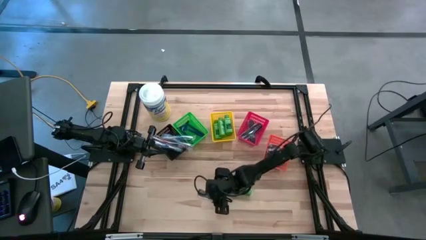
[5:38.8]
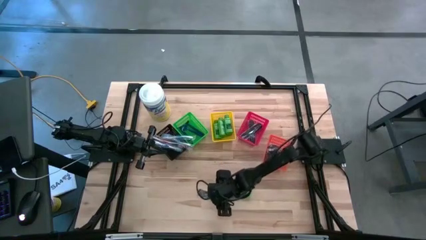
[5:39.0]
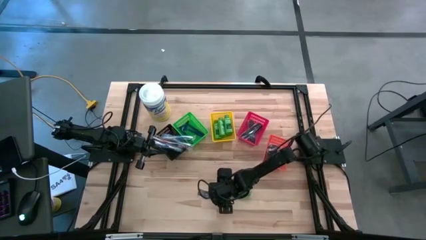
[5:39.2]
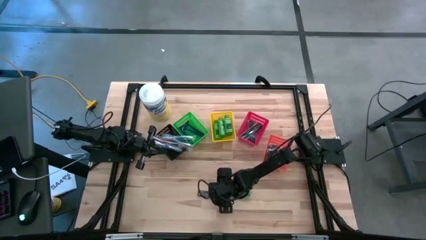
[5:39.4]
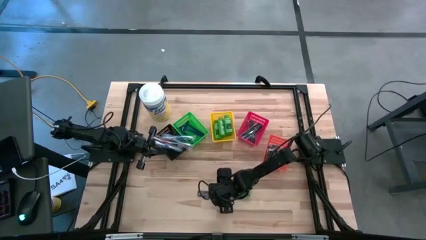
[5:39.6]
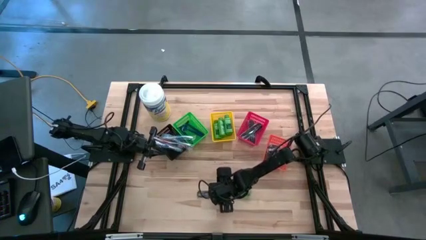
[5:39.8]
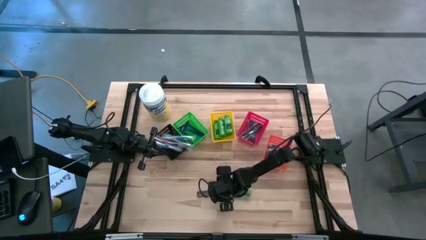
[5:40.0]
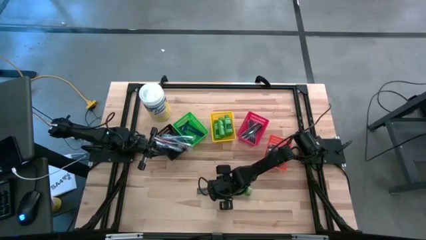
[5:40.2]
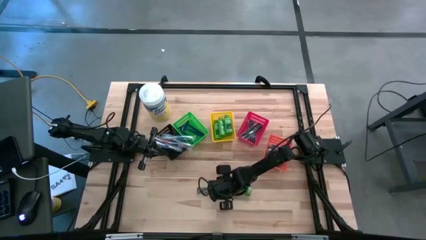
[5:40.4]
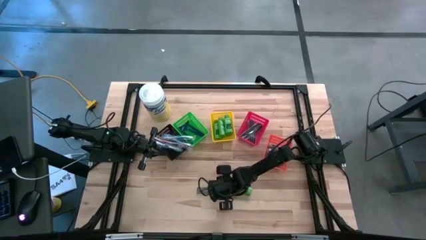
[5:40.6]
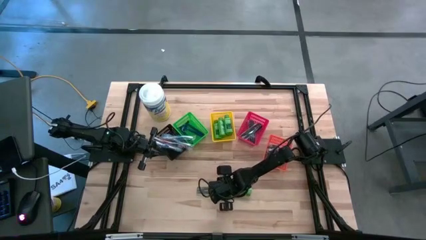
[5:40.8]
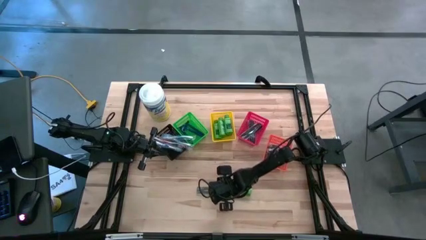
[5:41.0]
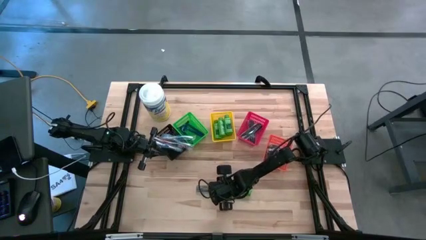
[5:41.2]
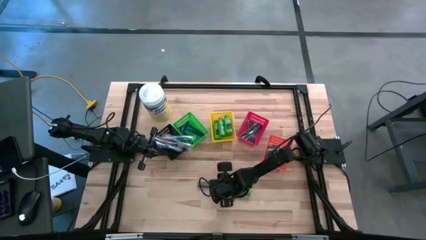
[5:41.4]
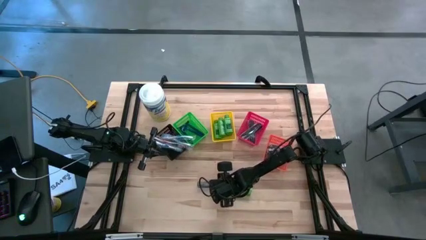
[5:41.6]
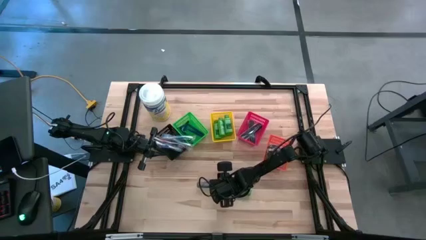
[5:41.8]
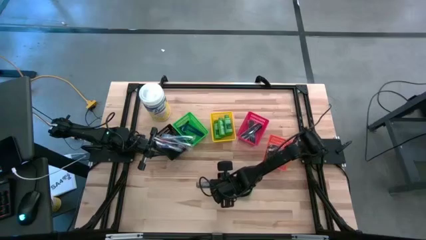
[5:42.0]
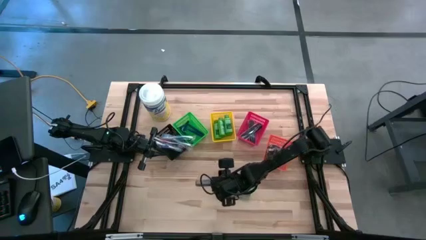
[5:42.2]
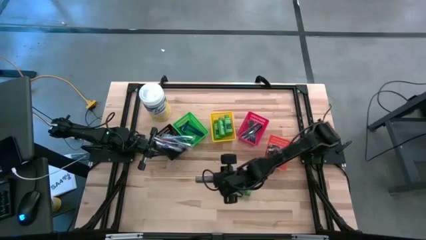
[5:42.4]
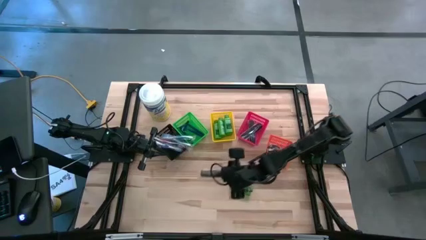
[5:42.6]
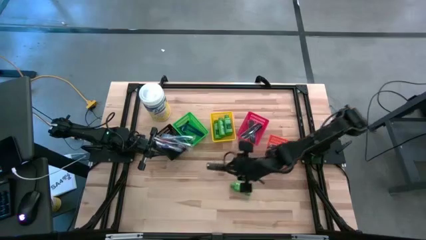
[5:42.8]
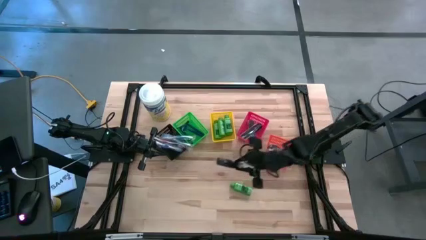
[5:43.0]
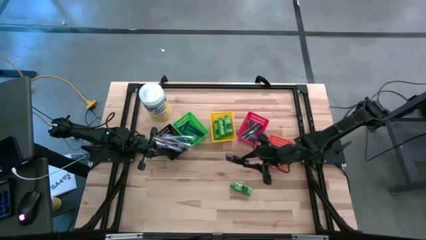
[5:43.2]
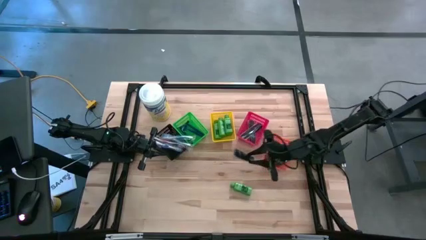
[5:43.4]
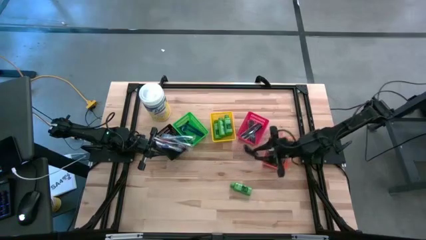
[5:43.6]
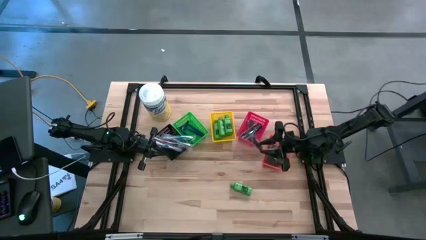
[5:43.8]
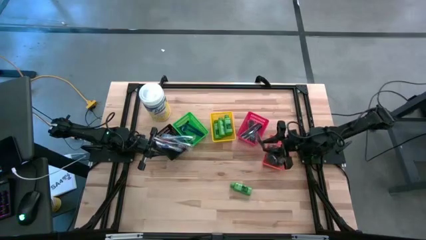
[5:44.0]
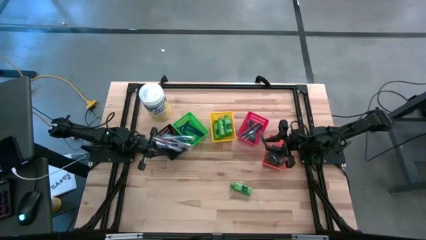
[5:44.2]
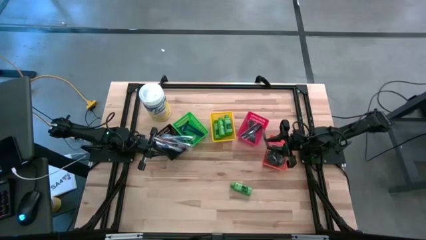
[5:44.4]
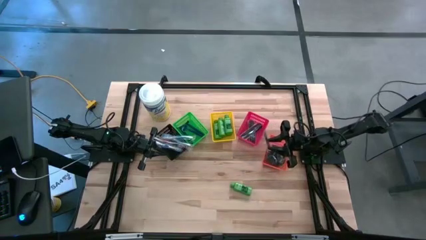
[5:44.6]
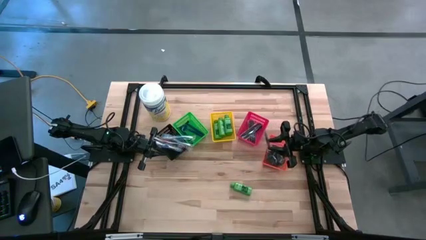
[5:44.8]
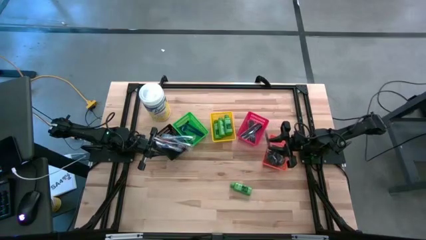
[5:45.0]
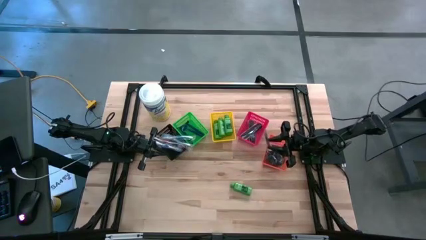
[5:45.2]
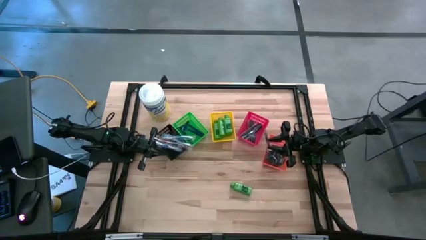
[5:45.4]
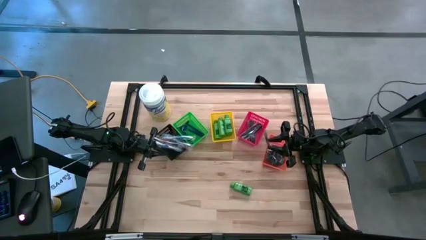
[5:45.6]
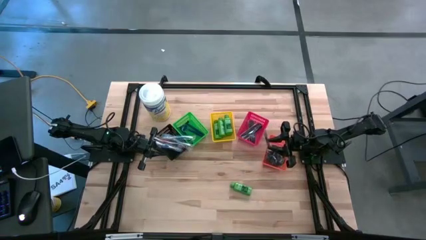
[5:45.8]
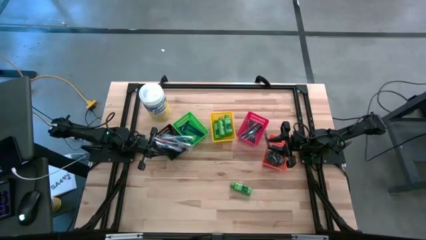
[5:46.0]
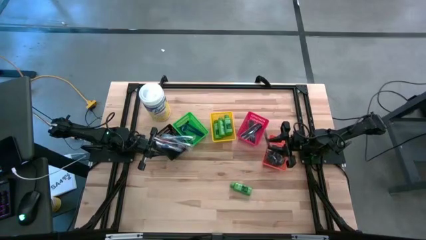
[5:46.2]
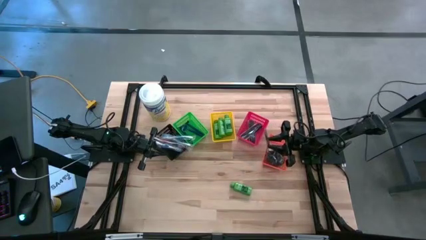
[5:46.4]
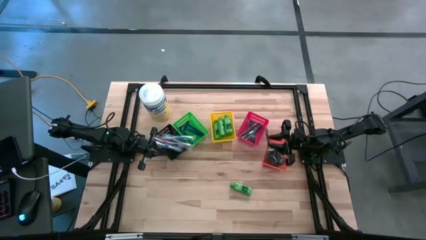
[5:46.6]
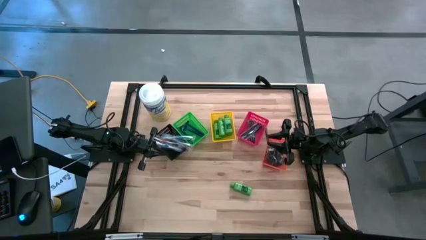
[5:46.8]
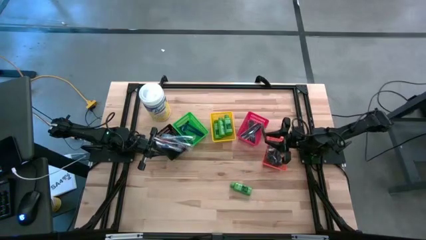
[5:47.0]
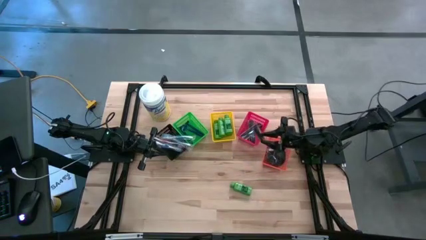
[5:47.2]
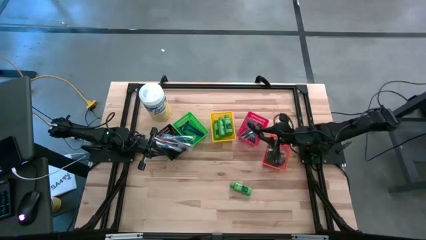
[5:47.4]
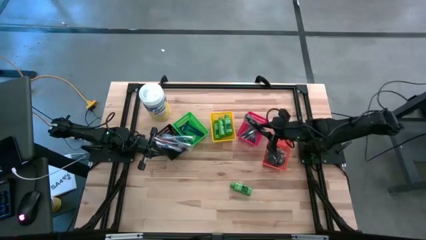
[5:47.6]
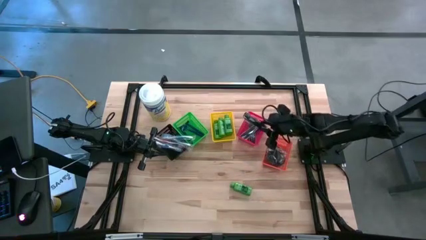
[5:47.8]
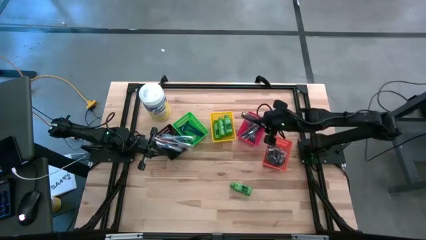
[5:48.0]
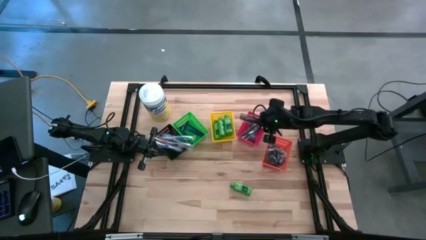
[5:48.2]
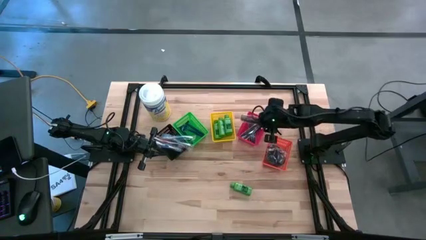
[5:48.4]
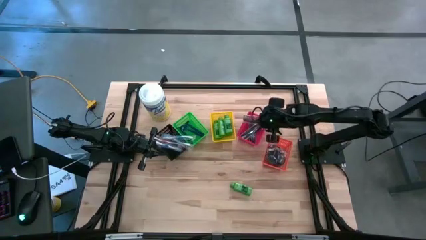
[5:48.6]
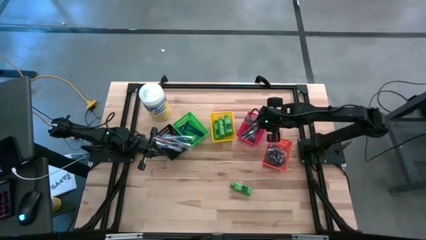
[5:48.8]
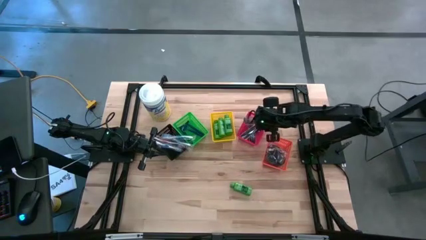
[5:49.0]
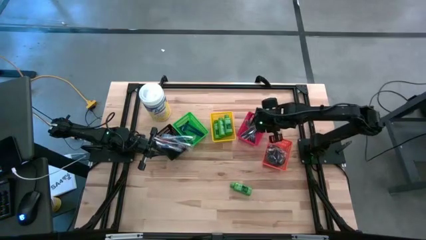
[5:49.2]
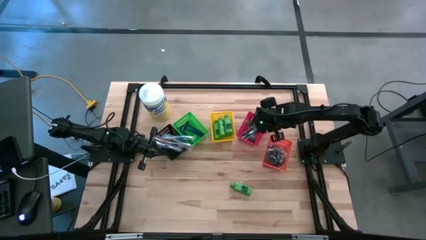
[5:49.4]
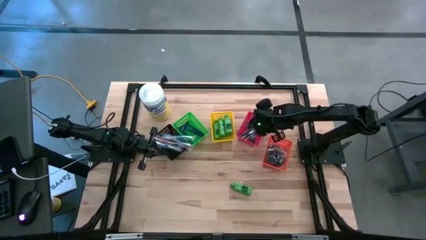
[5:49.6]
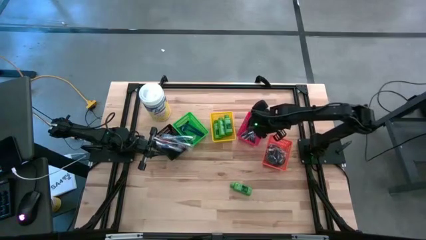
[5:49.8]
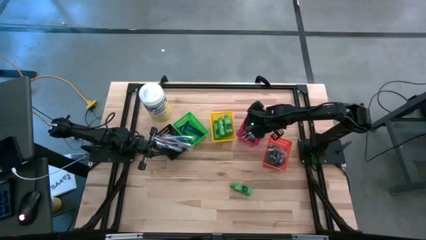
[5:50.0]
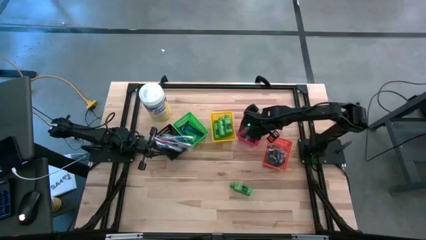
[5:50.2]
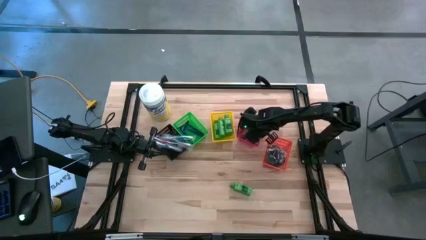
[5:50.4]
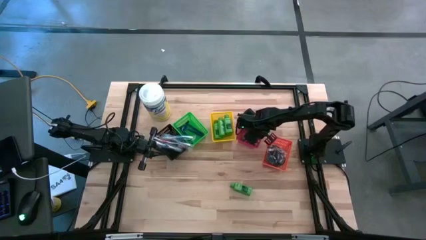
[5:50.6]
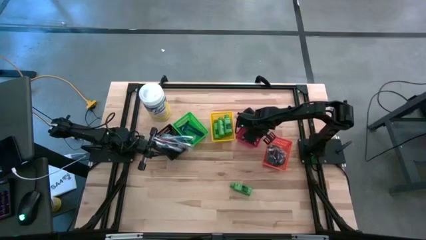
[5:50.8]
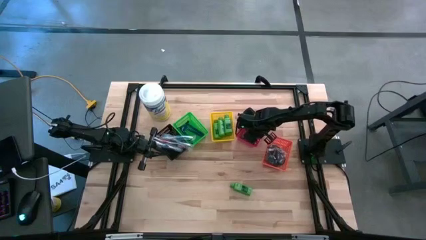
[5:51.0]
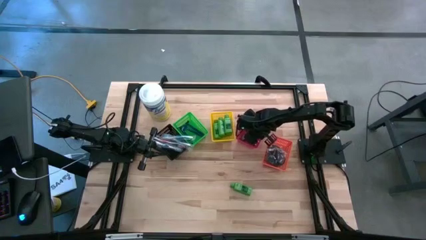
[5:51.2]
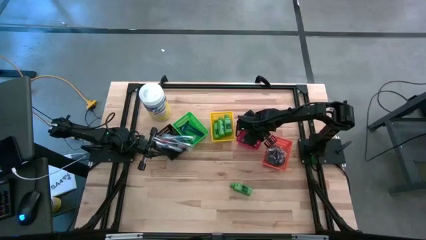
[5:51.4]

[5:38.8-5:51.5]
Task: Pick & Place Travel size toiletries
Put the black hair comb into the red bin
